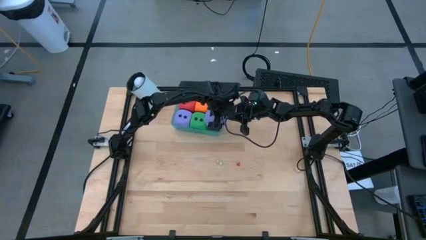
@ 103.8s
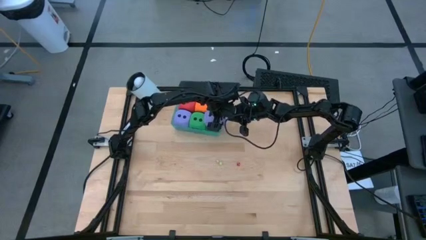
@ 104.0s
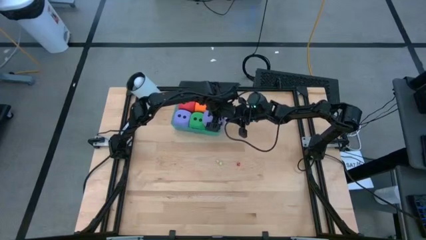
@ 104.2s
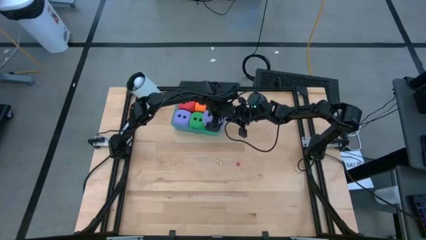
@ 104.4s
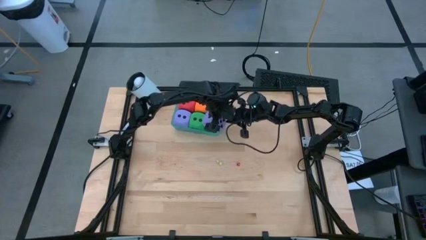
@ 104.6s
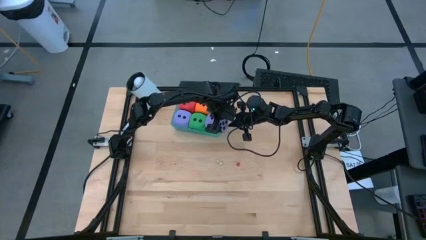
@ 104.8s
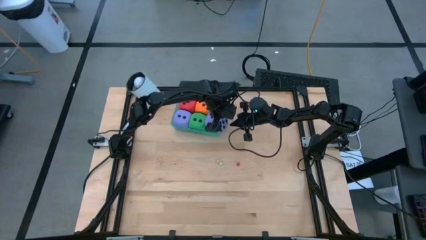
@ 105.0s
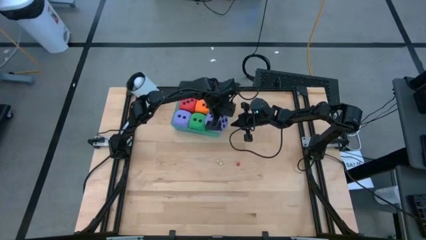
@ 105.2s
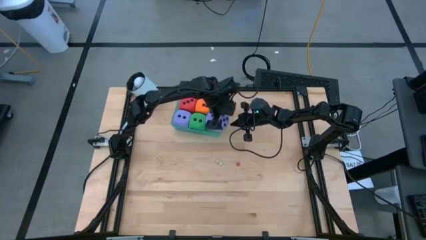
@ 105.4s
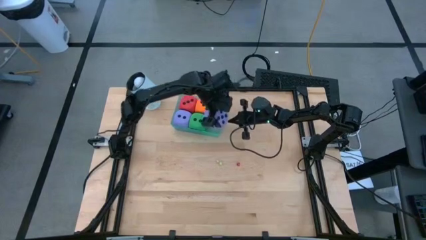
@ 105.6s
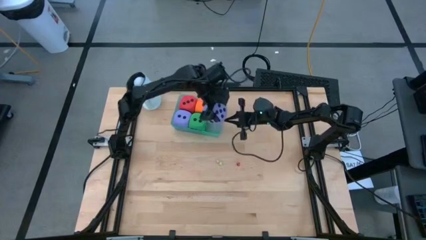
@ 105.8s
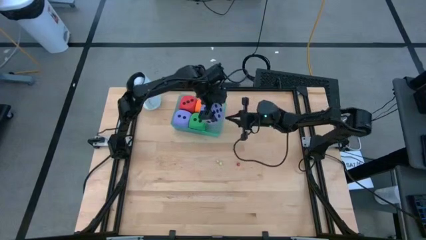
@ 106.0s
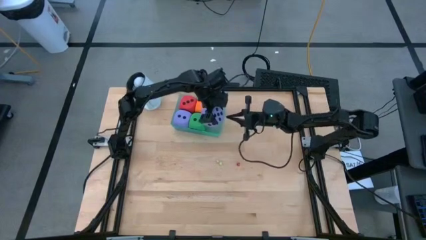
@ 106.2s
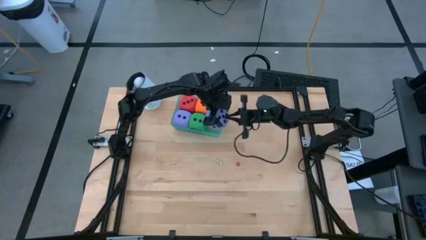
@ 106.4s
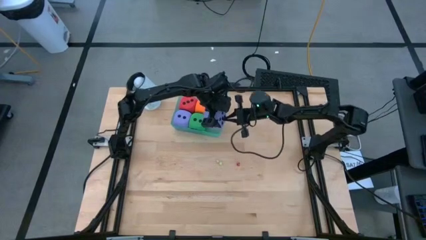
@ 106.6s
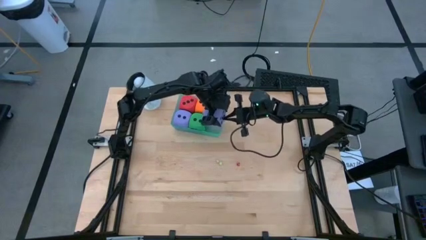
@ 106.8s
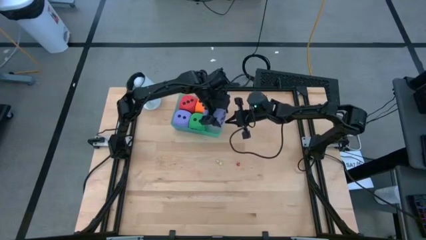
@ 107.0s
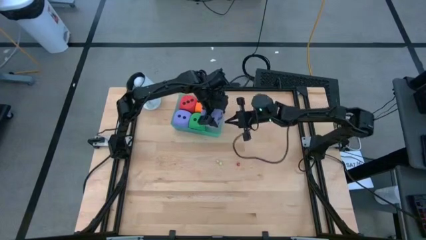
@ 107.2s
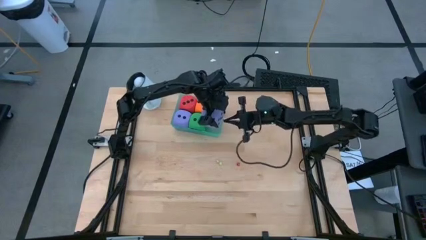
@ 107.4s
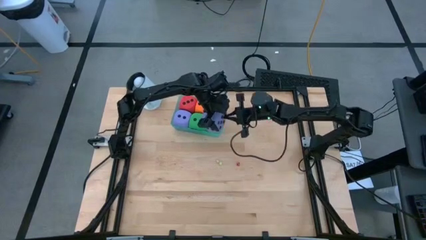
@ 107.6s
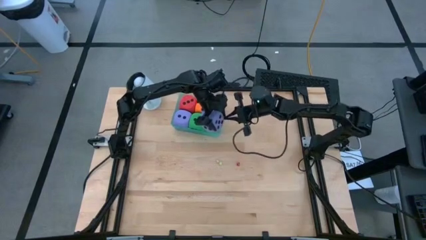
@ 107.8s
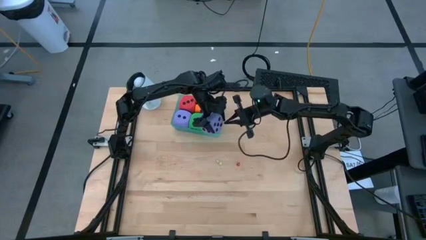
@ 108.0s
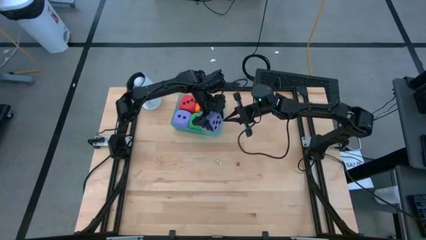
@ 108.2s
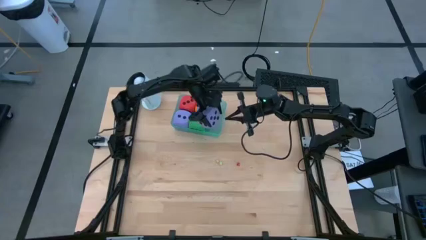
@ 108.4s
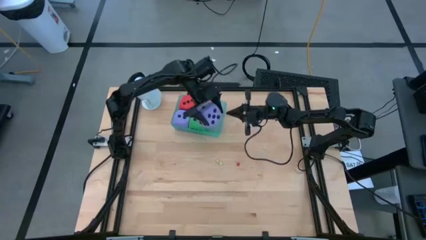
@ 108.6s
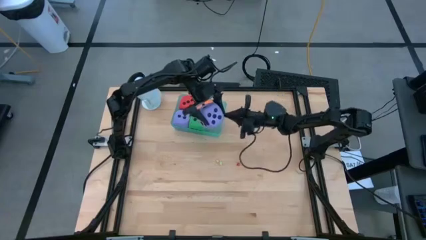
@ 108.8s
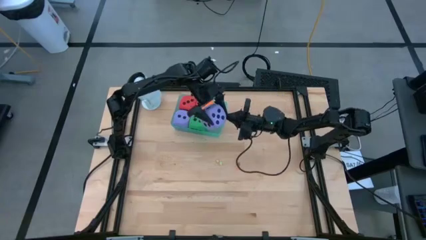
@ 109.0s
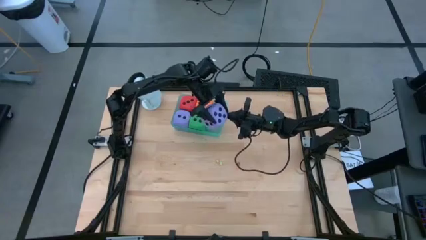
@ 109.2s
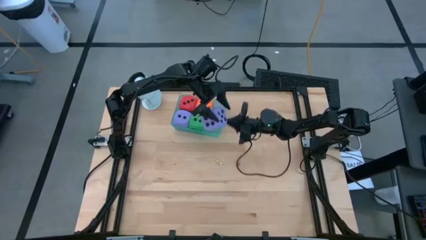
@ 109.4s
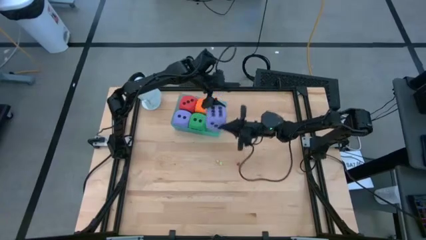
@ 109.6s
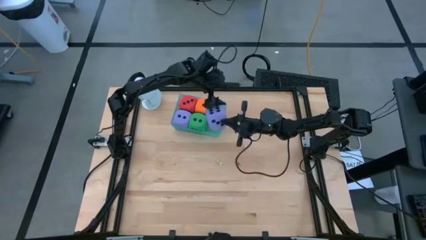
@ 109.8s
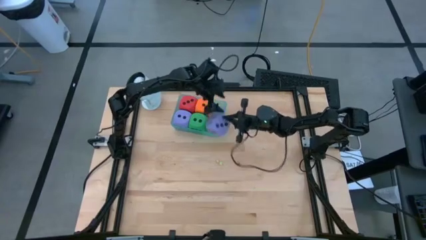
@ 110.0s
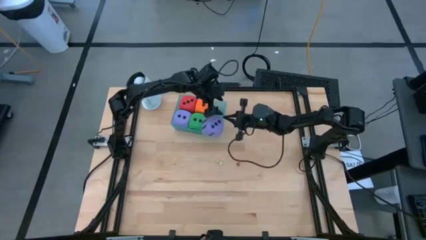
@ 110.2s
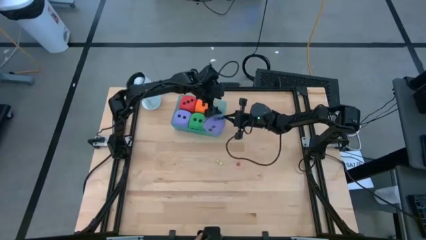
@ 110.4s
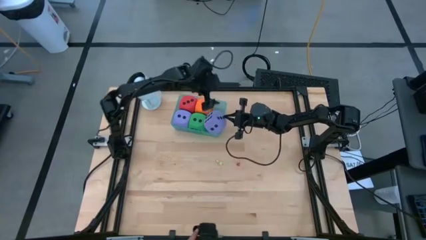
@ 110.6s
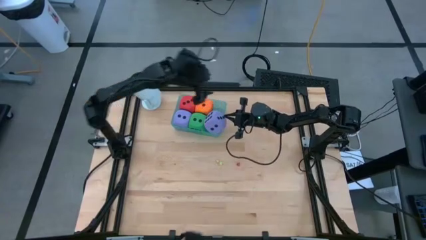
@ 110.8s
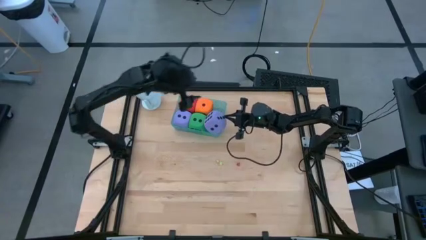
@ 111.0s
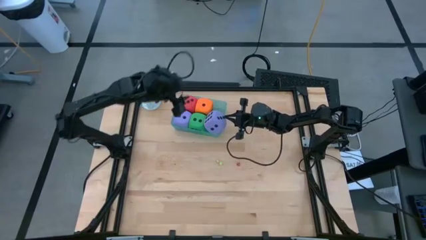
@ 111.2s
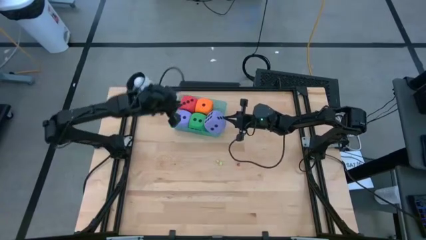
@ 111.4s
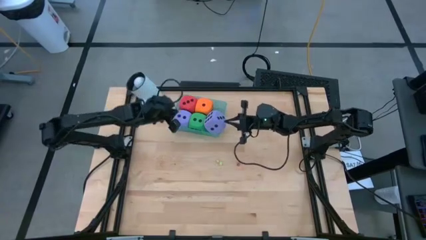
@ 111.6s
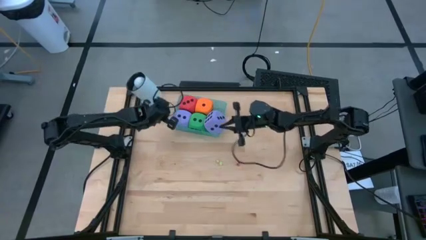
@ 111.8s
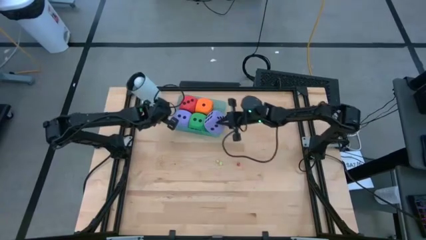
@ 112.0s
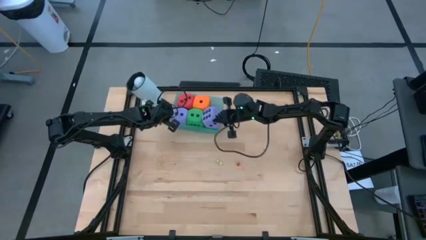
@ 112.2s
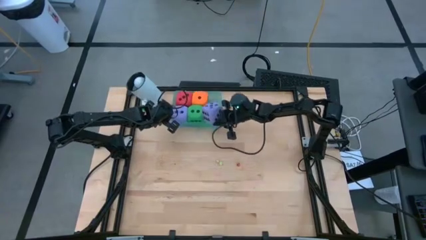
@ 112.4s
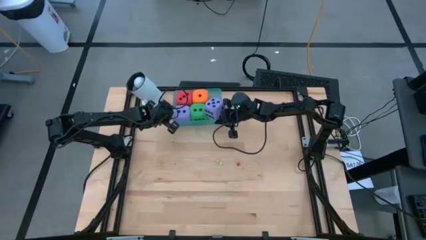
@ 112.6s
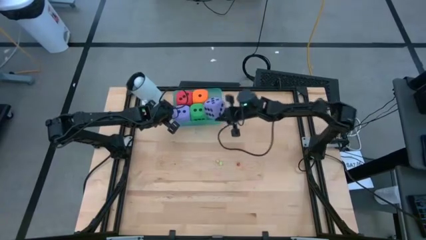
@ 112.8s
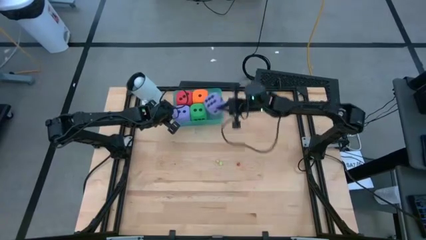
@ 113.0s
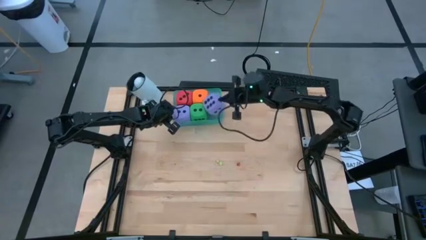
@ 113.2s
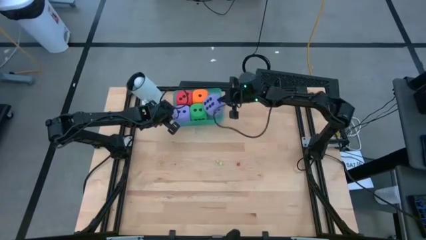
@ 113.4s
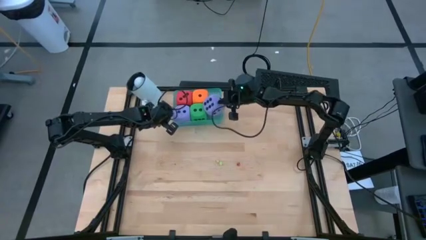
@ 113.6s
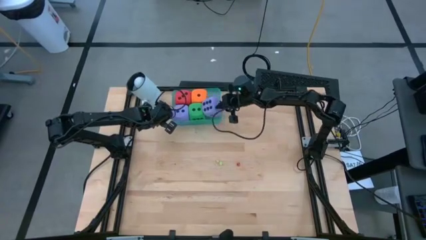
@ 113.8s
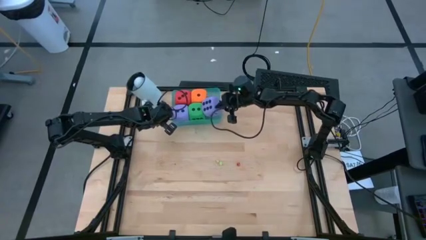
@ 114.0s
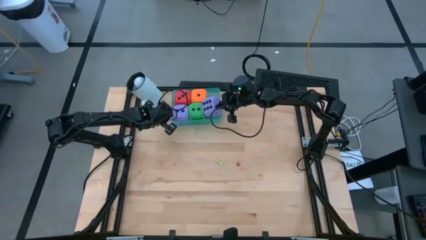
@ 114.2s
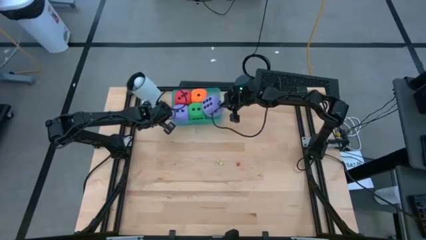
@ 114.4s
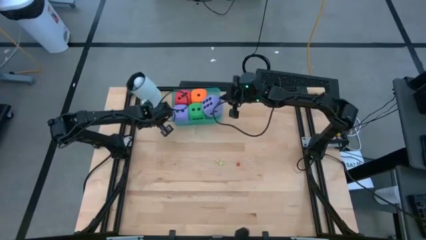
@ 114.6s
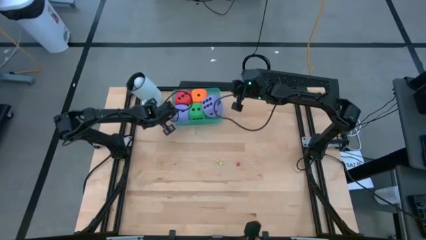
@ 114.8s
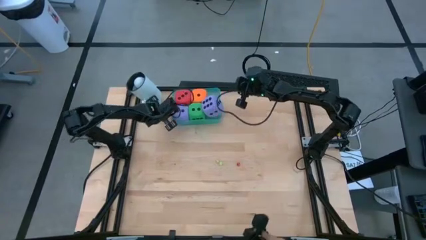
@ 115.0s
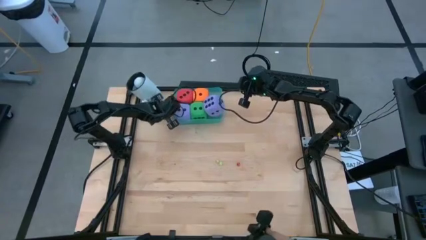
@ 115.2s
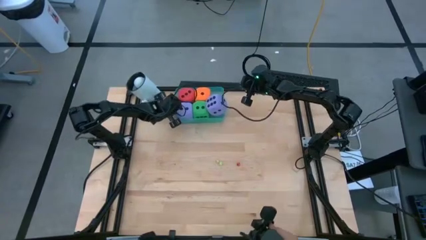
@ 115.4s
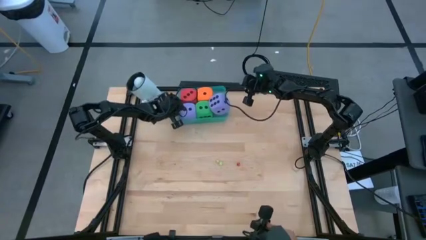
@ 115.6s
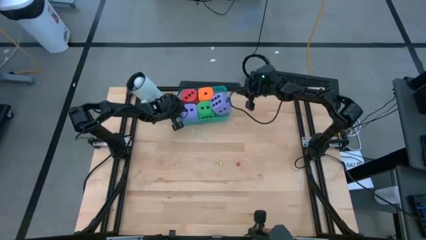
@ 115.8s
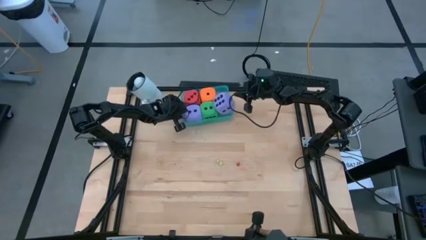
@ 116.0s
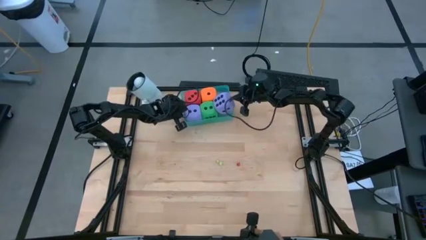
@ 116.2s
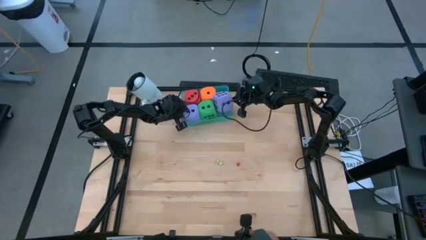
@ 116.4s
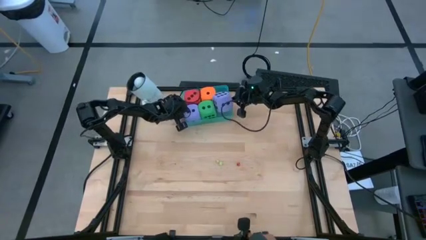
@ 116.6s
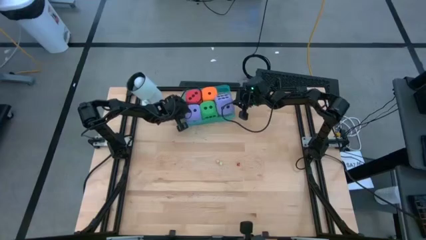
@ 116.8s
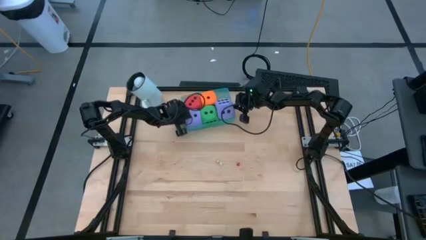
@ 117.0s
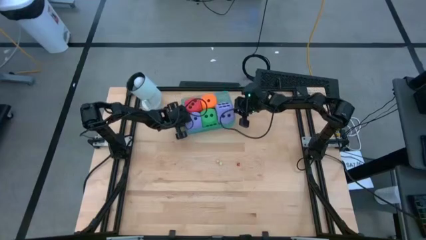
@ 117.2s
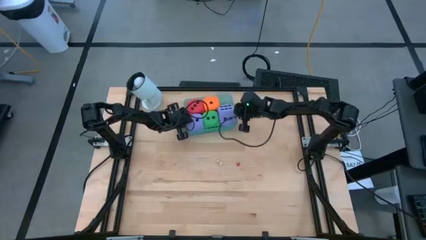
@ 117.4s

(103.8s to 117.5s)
Task: Pick & Place Dice
Put the large purple dice into the light blue bin

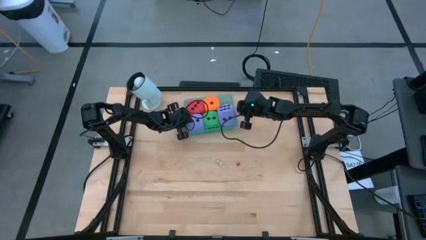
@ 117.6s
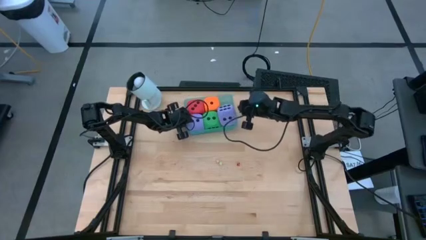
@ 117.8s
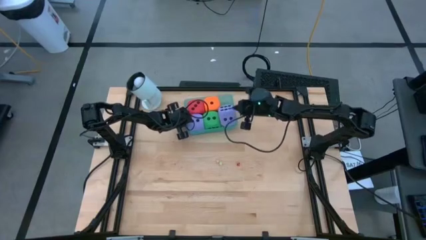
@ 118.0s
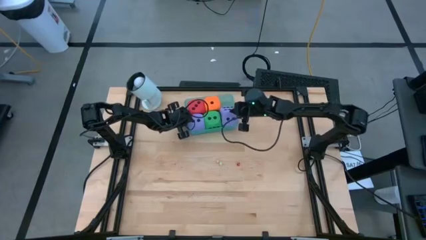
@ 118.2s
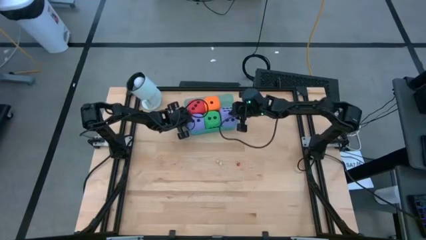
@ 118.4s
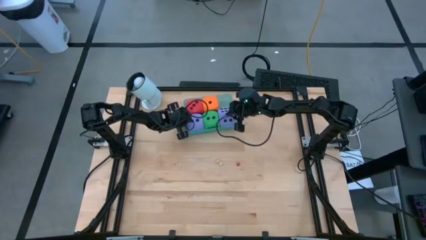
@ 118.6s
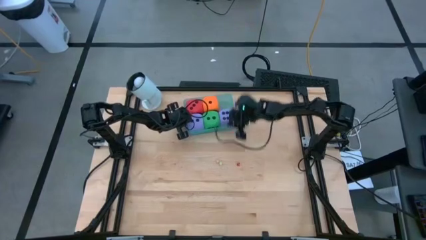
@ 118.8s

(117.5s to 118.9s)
Put the large purple dice into the light blue bin

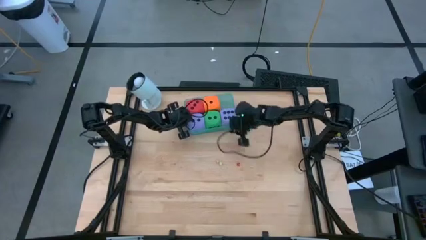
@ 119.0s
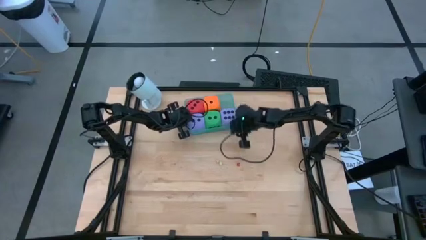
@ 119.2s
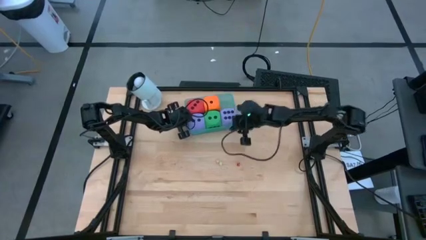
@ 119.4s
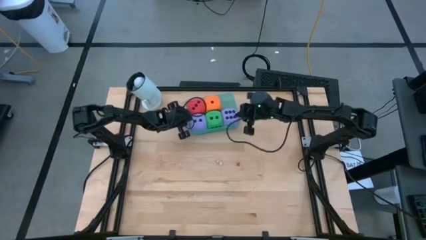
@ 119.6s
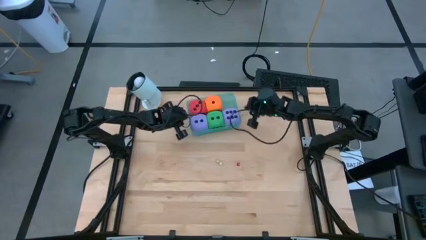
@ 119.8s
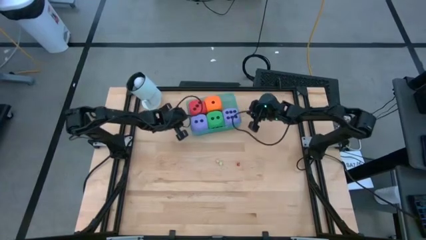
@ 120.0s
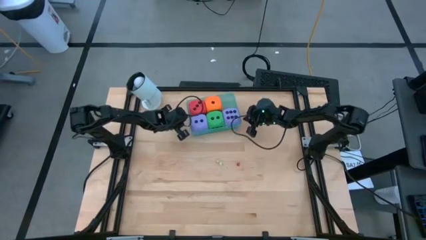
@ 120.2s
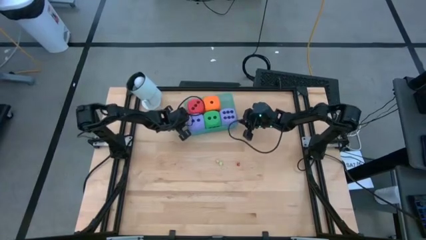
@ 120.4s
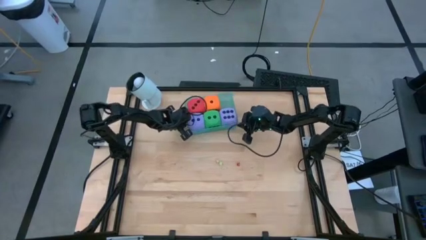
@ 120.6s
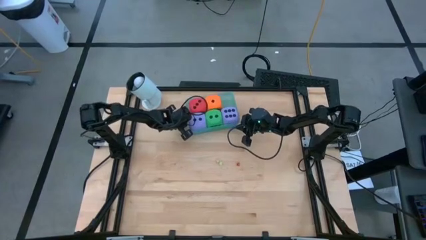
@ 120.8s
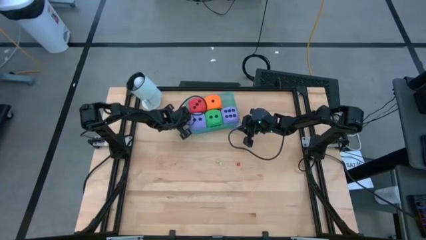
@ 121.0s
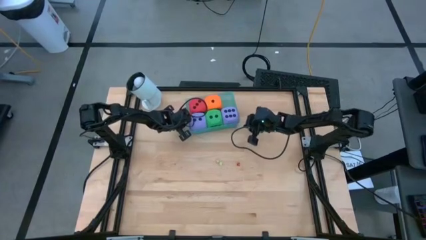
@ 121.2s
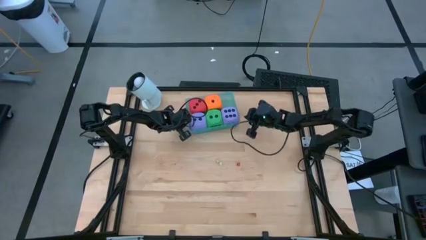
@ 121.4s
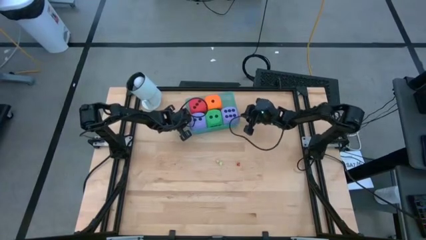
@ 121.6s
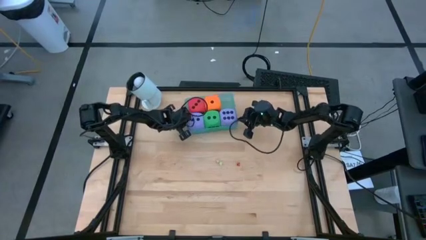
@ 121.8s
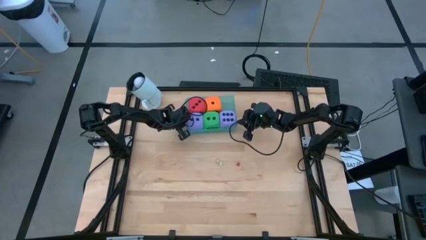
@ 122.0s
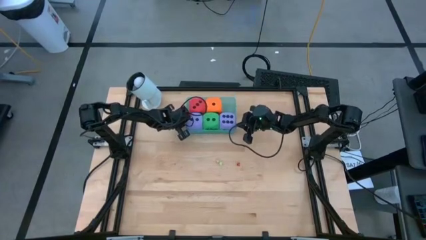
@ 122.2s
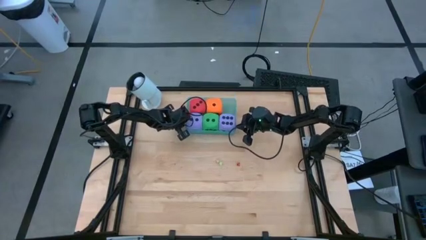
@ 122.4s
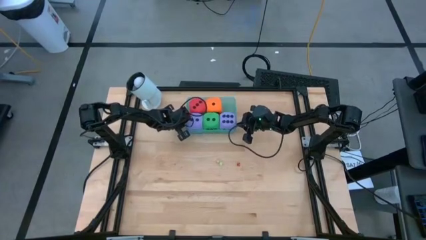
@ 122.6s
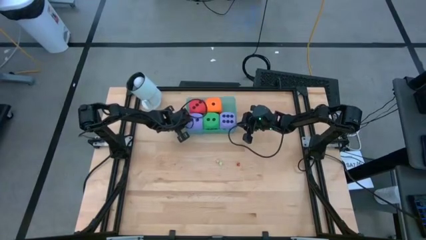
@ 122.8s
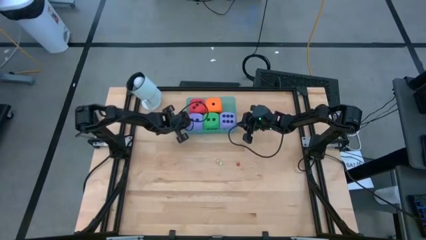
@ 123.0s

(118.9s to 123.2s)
Adjust the light blue bin
